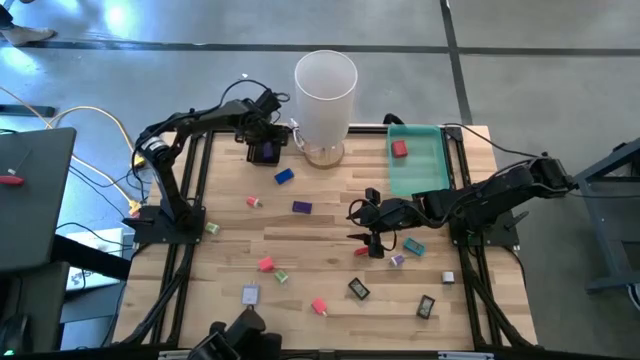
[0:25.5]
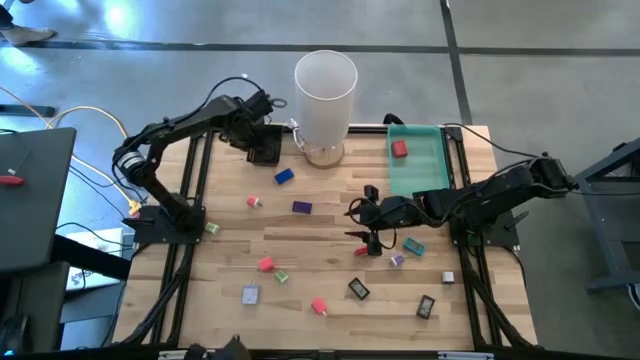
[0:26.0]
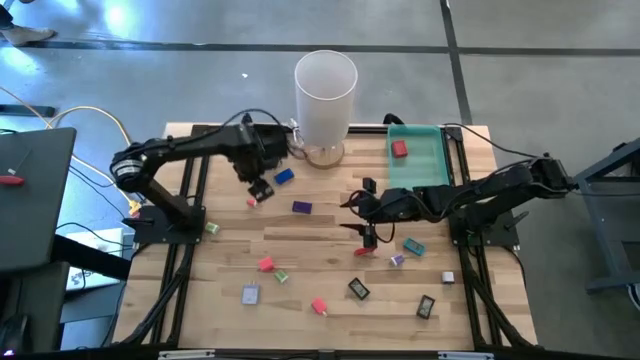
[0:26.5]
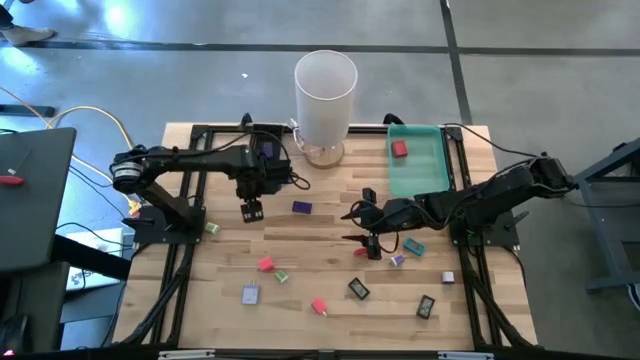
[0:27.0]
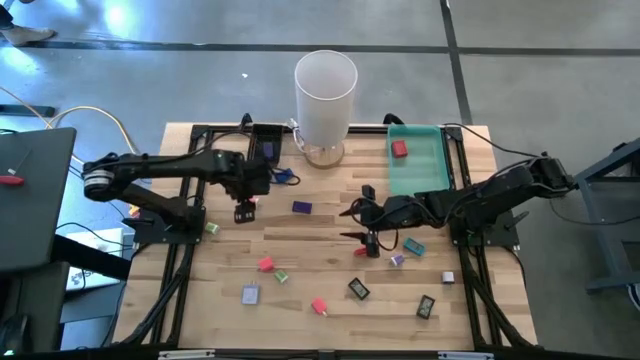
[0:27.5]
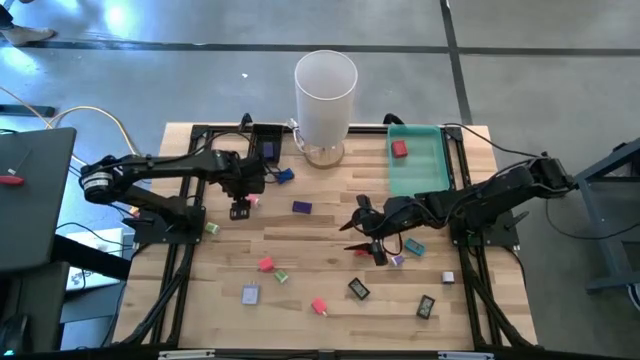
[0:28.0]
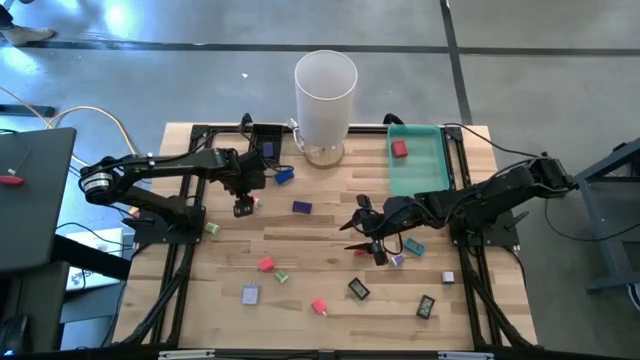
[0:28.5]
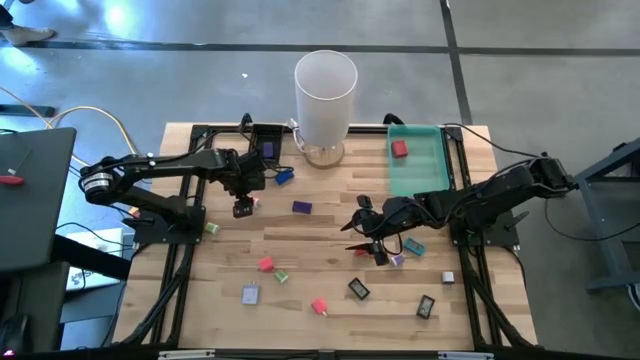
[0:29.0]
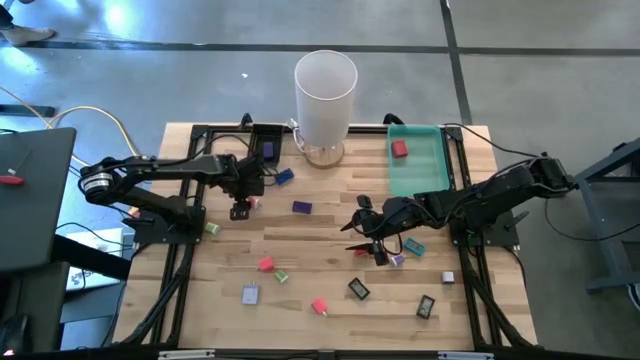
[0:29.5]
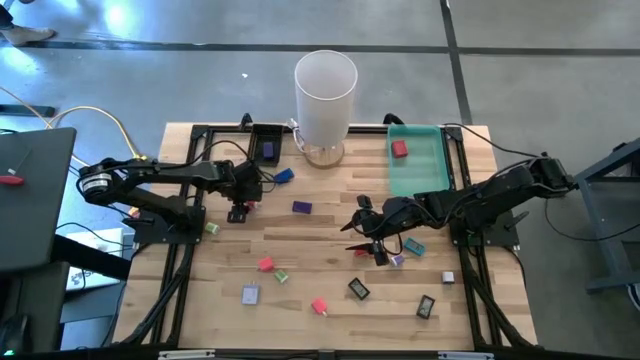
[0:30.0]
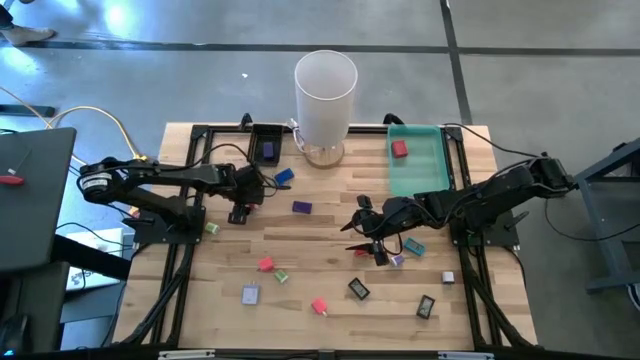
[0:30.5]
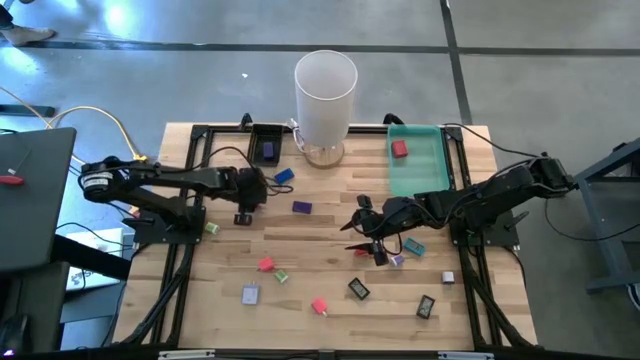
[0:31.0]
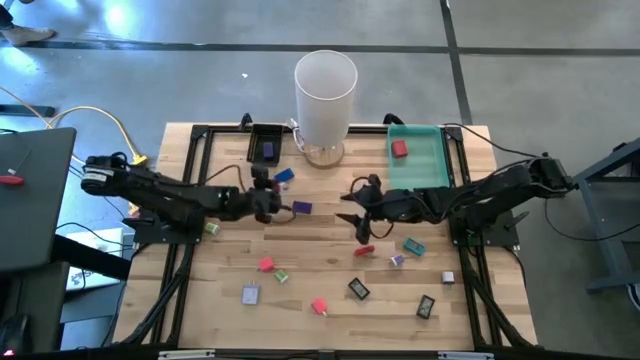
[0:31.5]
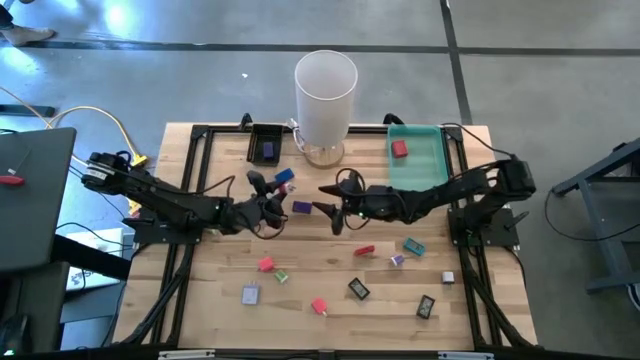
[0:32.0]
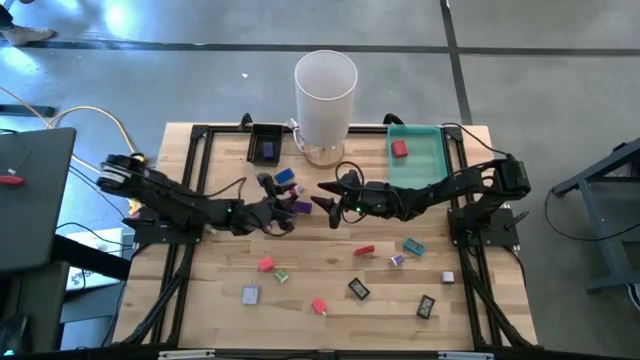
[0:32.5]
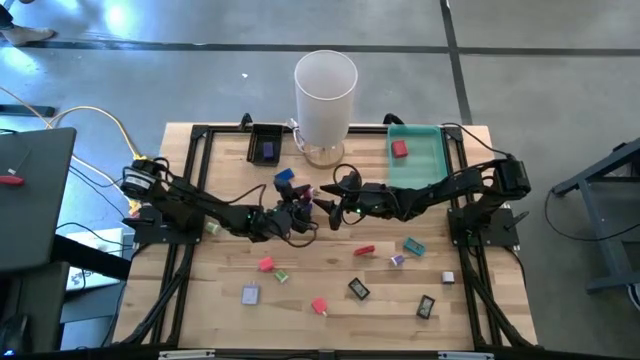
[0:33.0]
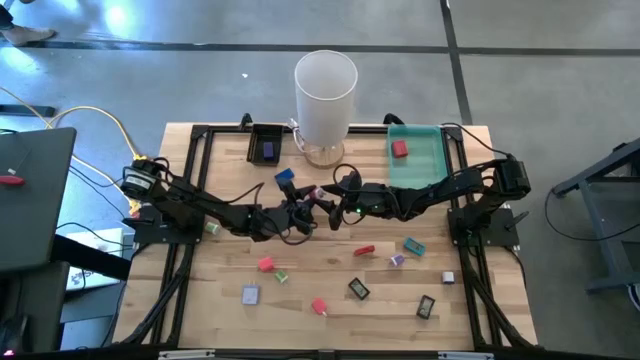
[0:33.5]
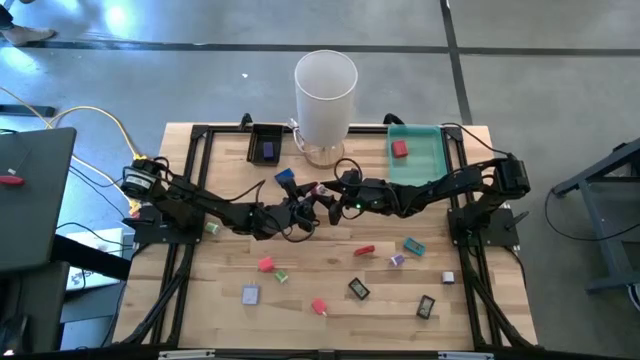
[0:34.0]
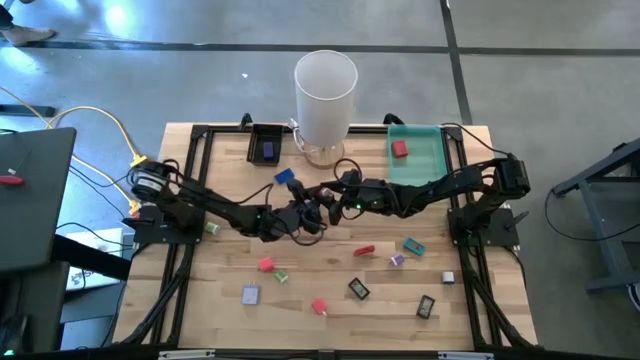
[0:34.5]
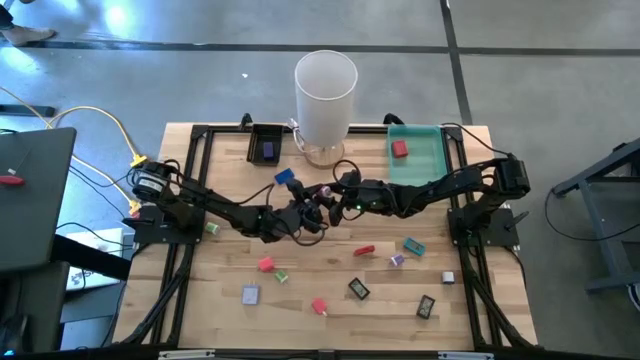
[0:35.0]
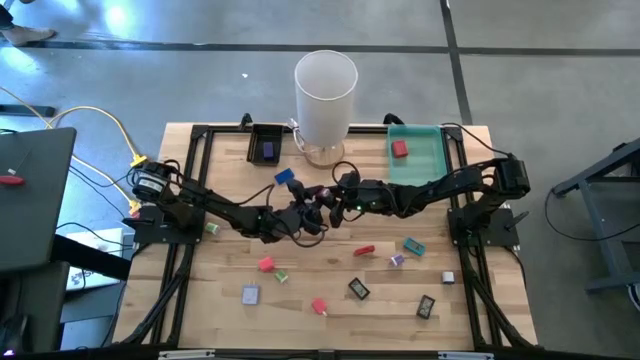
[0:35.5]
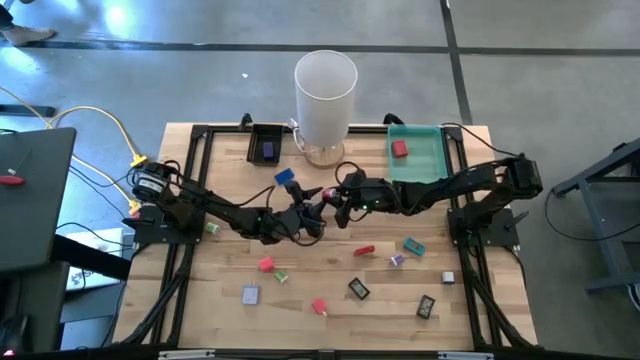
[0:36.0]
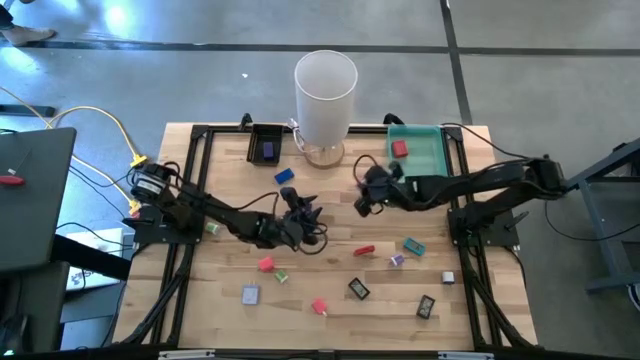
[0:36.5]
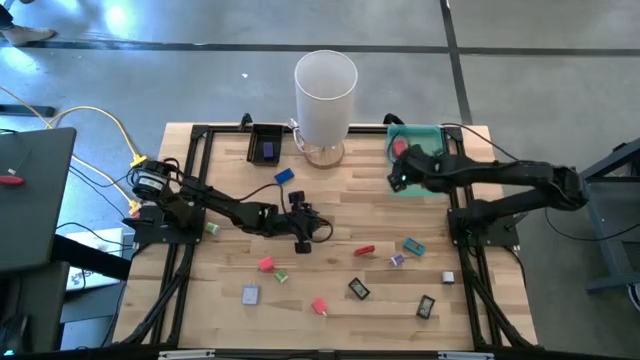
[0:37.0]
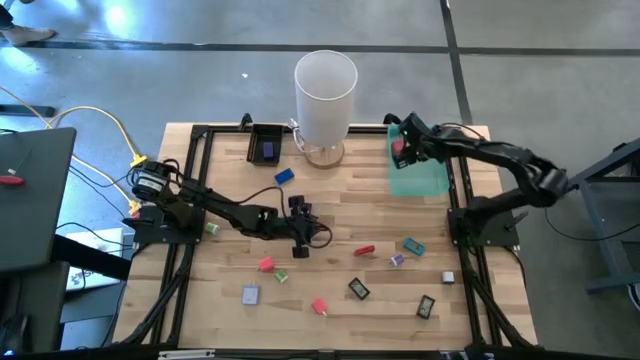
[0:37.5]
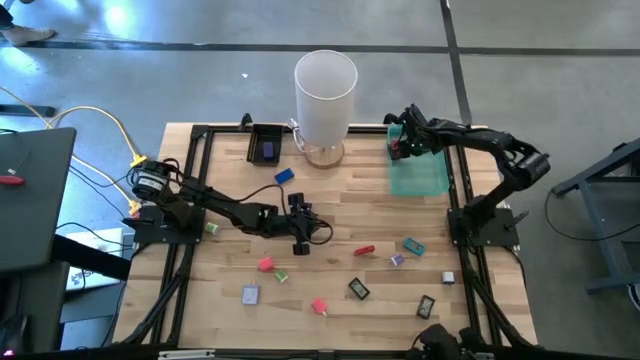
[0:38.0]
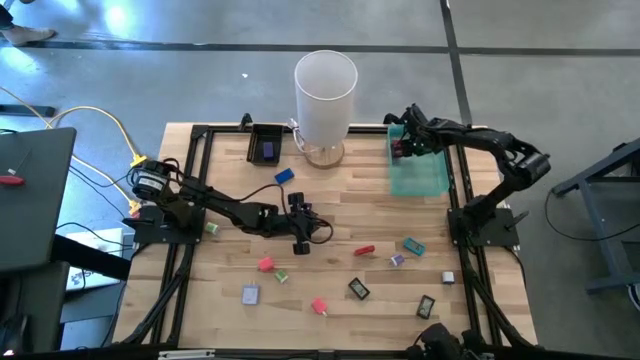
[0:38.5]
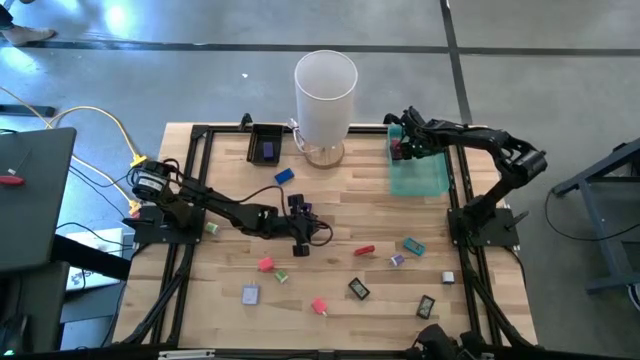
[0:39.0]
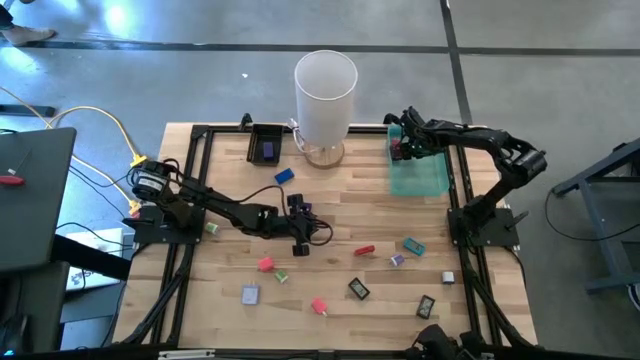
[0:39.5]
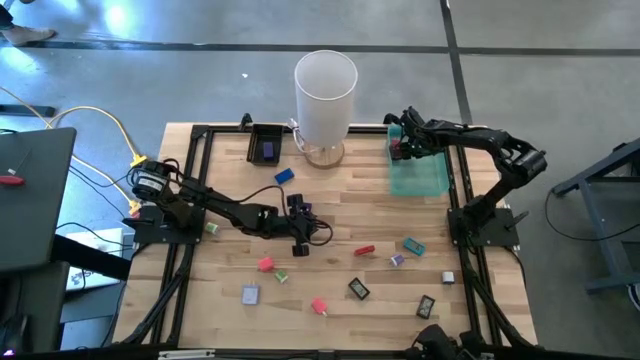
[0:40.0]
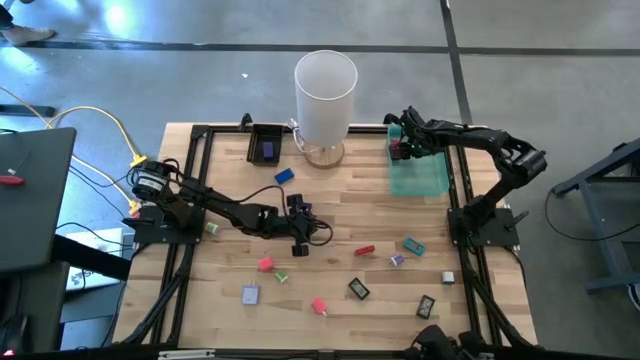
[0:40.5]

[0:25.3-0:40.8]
Task: Pick & Place Office items
Put the pink white adapter into the green bin
